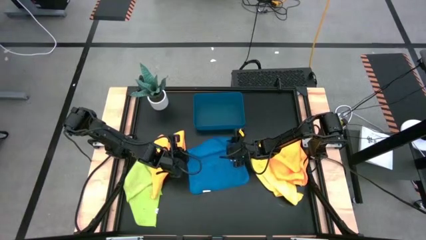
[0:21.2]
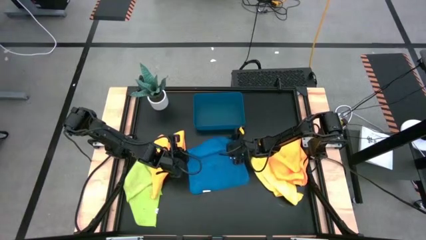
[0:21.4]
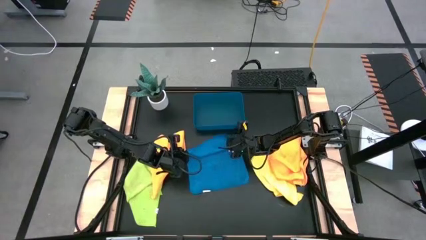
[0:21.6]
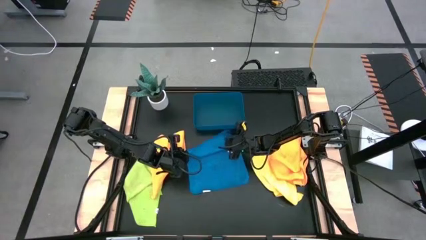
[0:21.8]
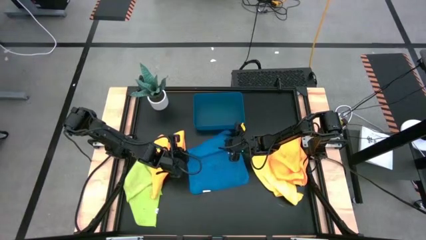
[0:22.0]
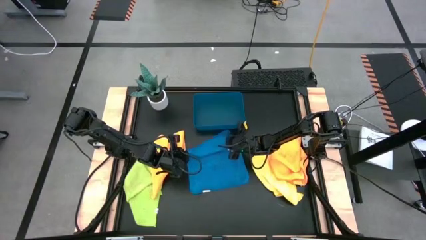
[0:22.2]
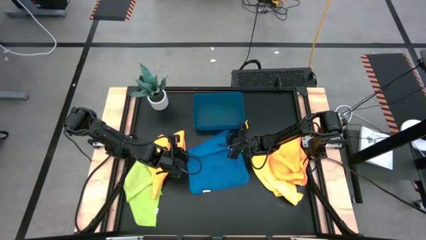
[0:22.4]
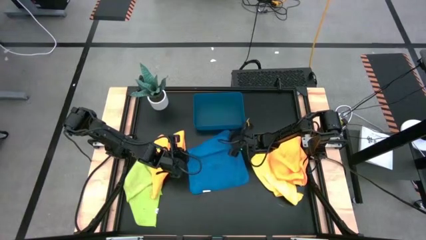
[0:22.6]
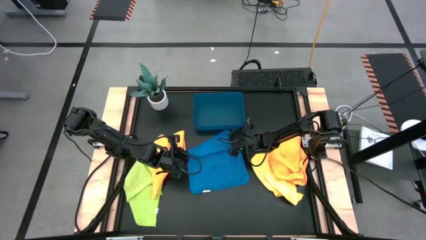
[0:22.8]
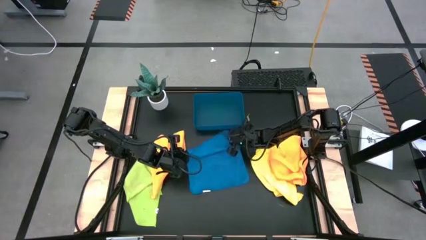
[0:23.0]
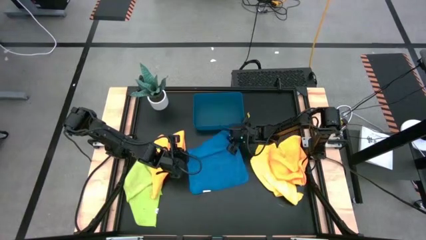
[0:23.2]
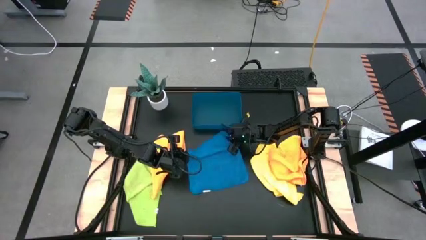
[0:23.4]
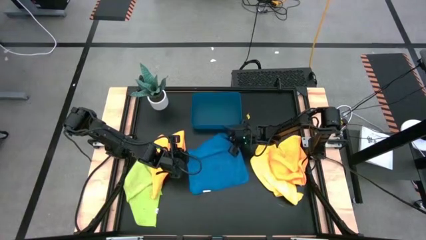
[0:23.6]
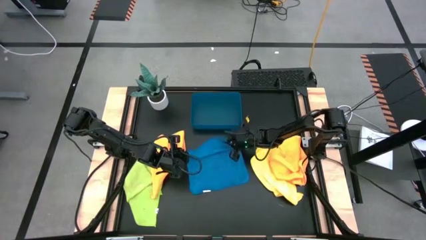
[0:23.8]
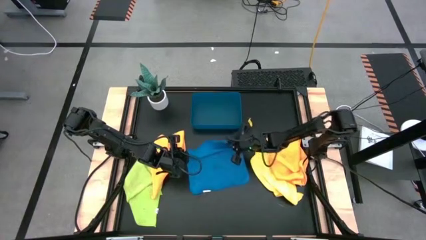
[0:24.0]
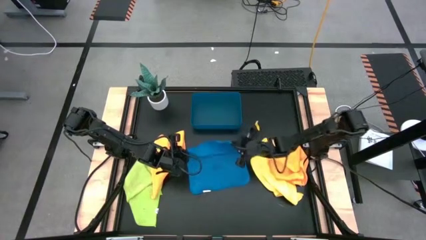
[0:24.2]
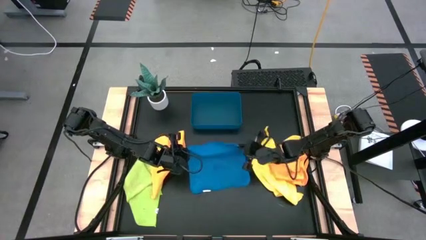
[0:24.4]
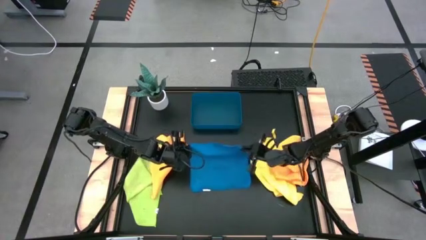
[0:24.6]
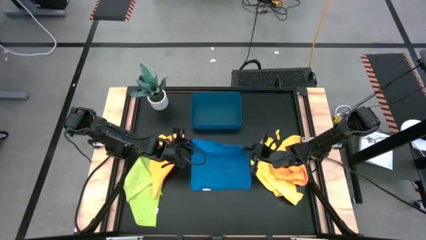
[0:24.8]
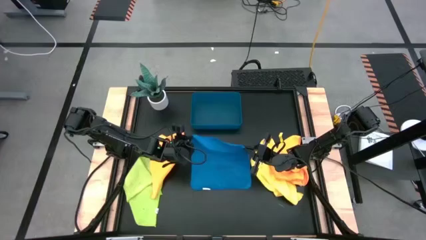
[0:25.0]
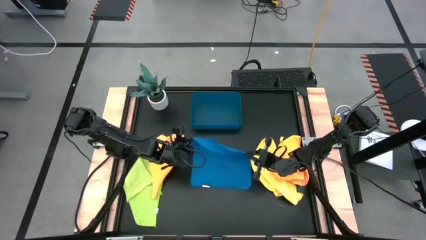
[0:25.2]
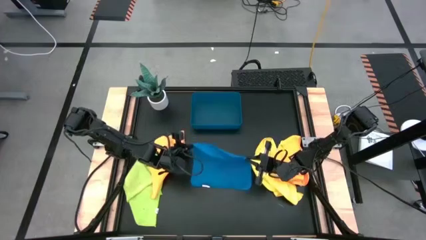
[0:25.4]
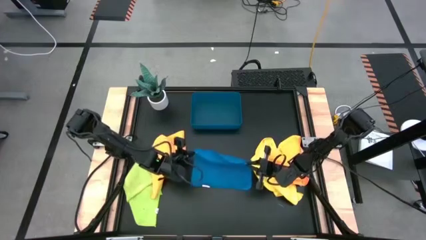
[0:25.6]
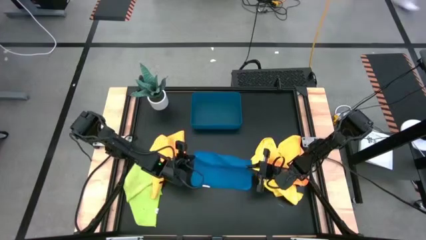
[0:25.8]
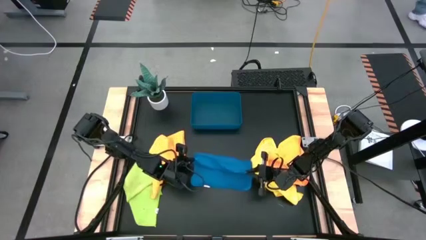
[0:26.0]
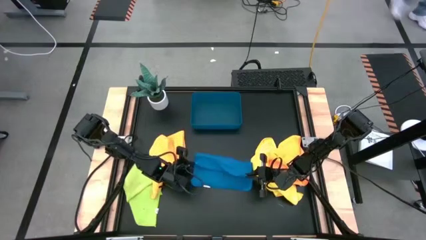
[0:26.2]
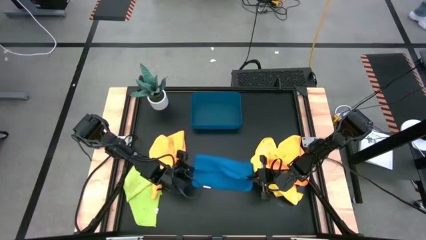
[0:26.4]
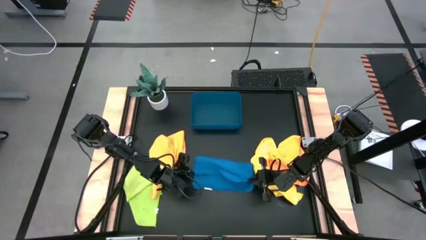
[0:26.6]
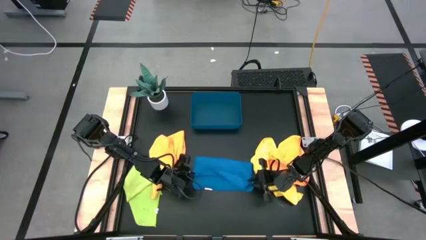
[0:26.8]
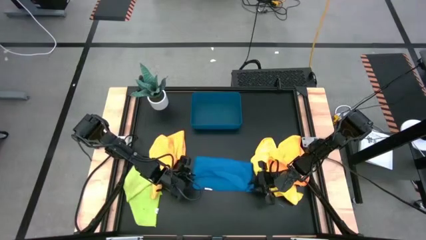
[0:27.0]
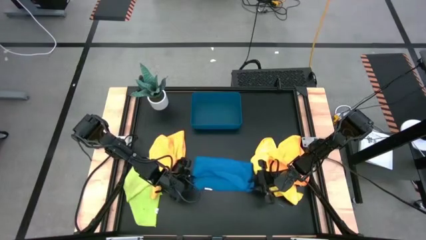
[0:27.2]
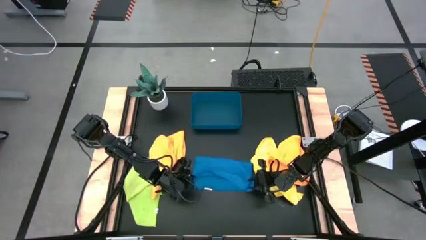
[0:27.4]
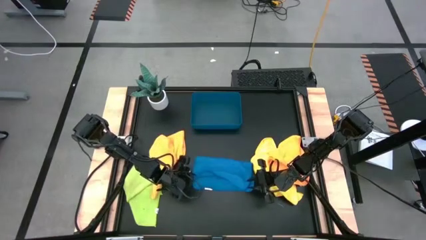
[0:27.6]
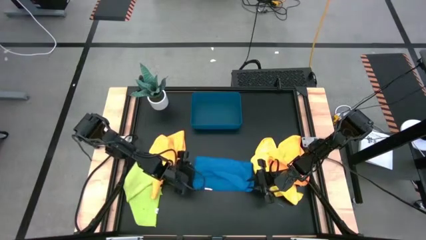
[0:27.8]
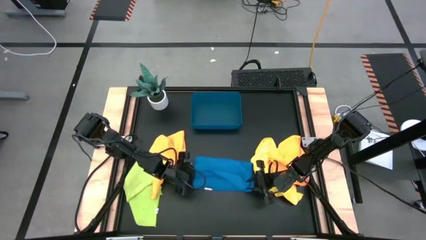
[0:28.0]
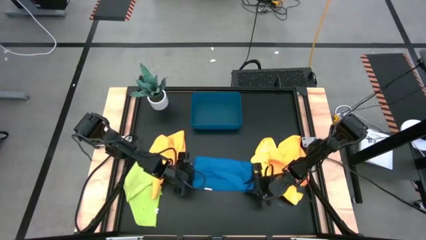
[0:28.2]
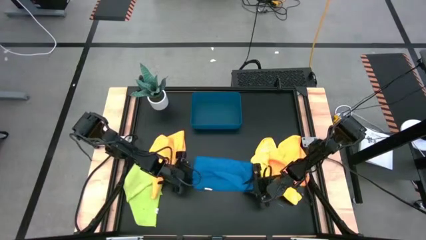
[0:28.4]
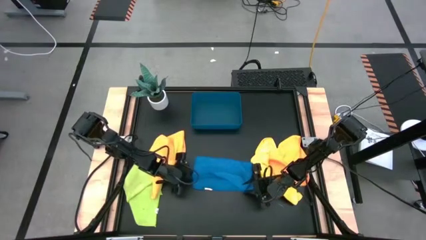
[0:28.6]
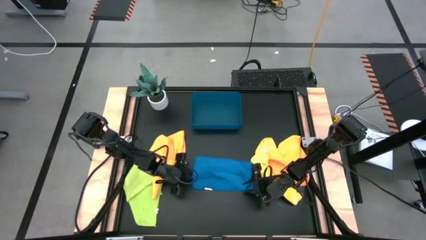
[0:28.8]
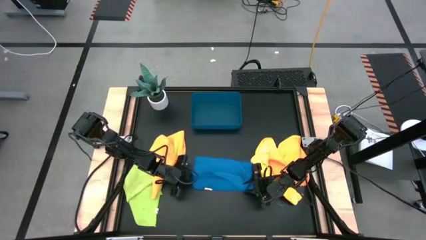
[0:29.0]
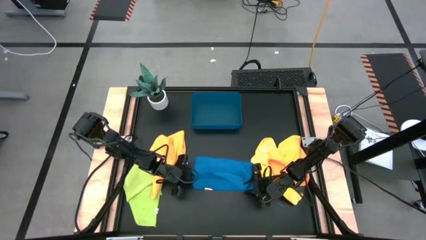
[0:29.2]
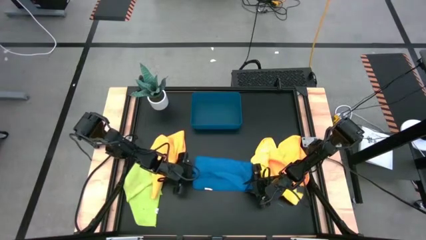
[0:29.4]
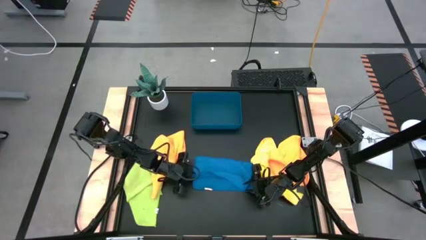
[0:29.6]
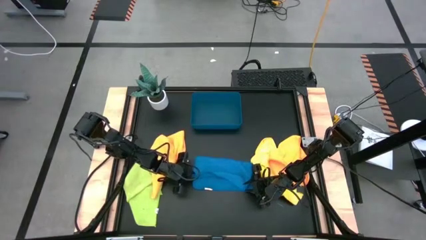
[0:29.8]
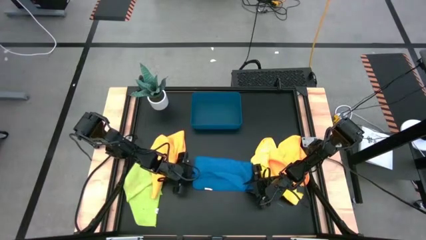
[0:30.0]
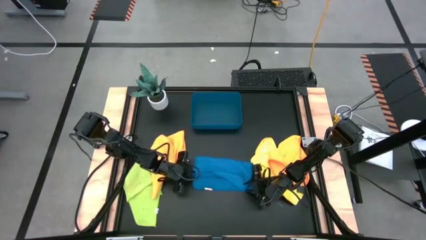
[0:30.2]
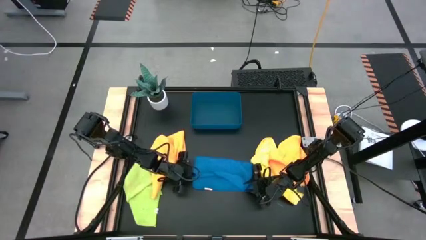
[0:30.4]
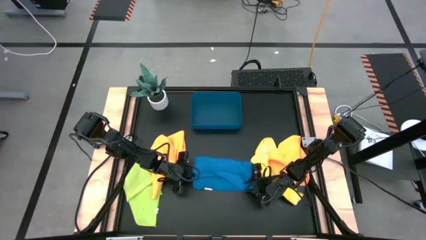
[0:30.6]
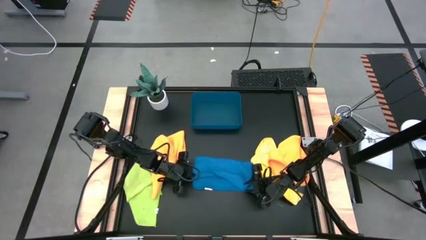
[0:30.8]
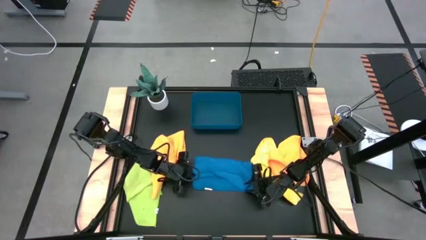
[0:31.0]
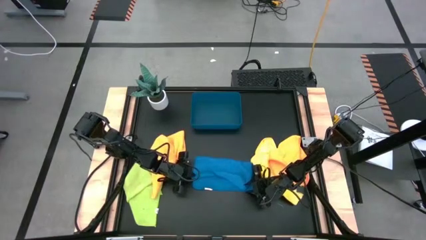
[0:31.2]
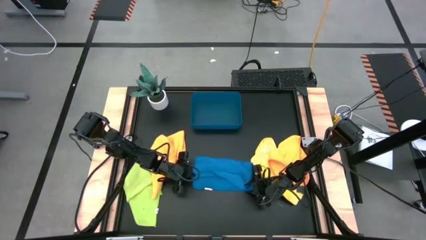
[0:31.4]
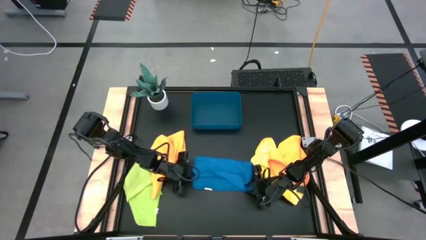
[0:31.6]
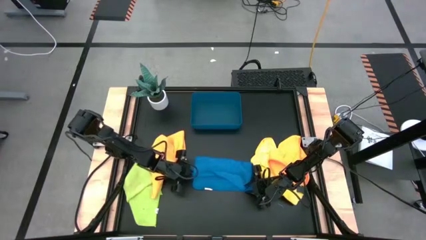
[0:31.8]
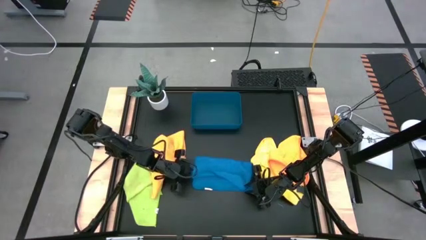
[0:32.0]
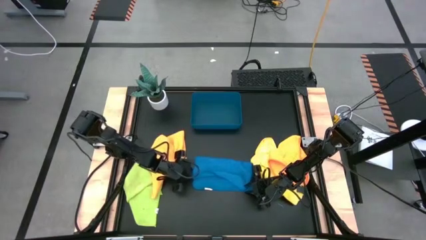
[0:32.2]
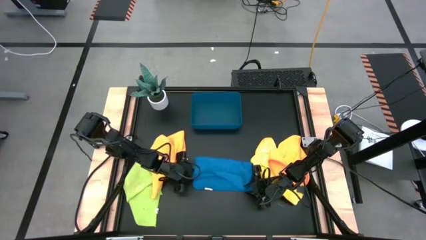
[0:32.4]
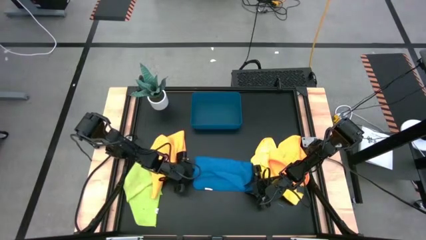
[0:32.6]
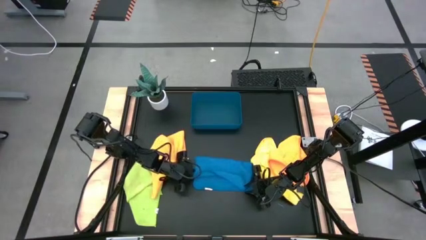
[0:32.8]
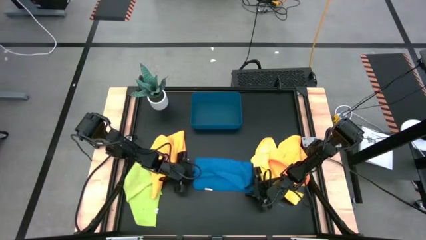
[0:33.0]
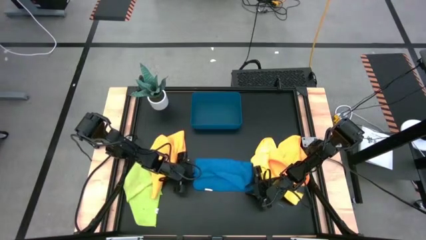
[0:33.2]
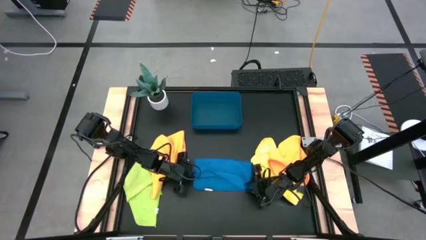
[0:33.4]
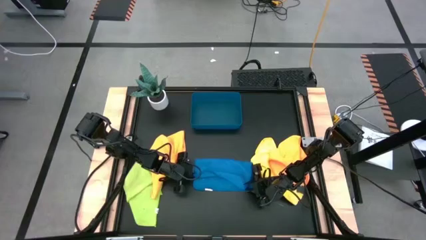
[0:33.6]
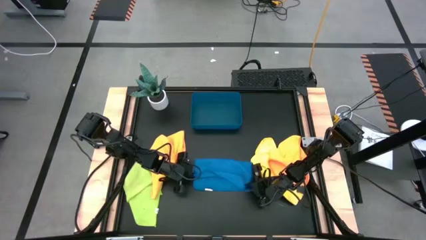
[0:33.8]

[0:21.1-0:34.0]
Task: Fold microfiber towels
Fold the blue microfiber cloth
